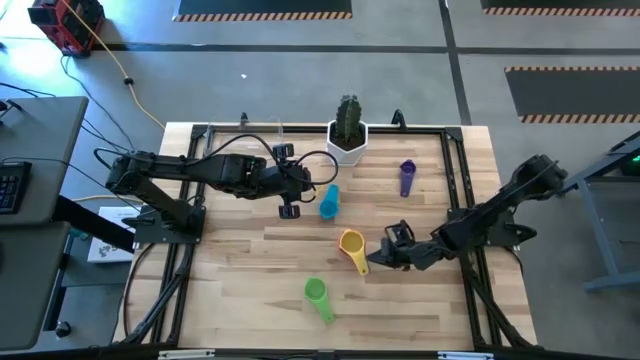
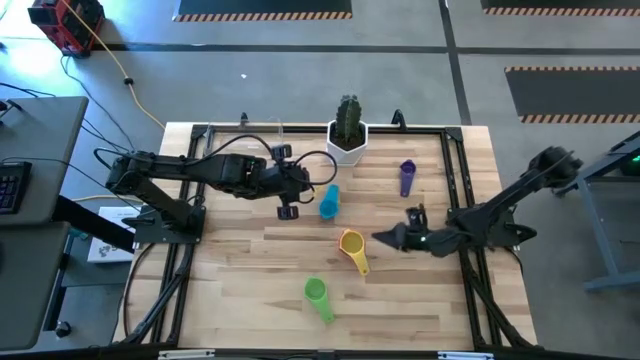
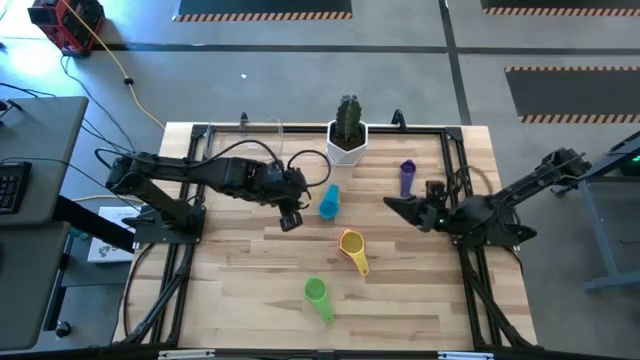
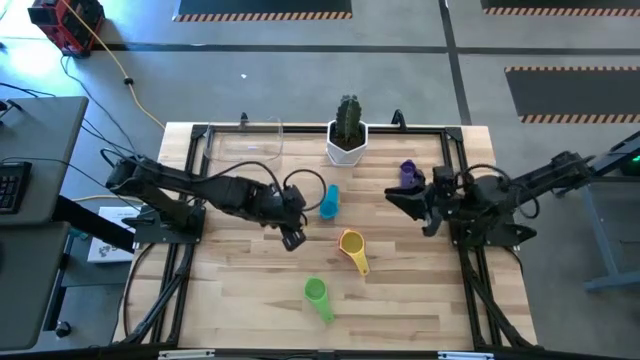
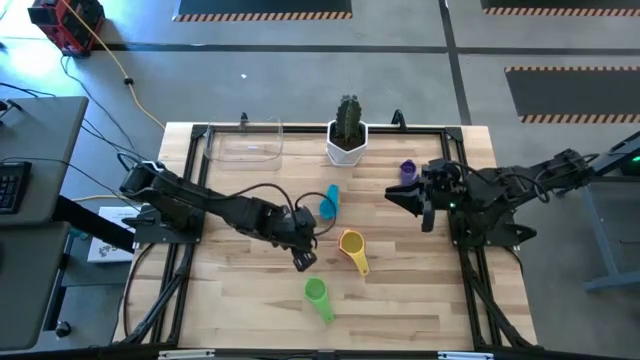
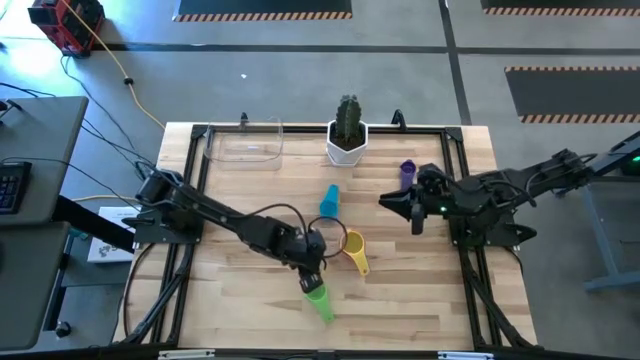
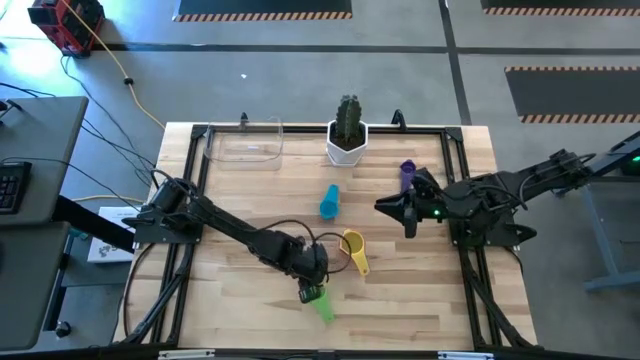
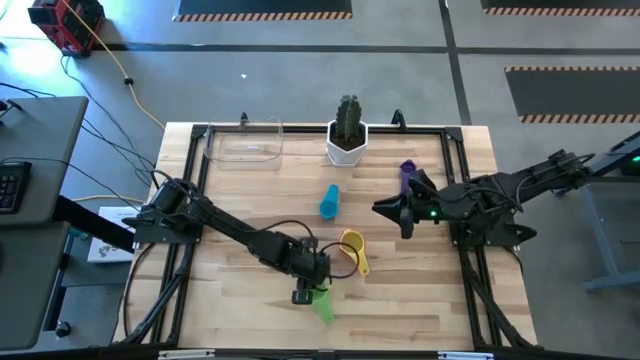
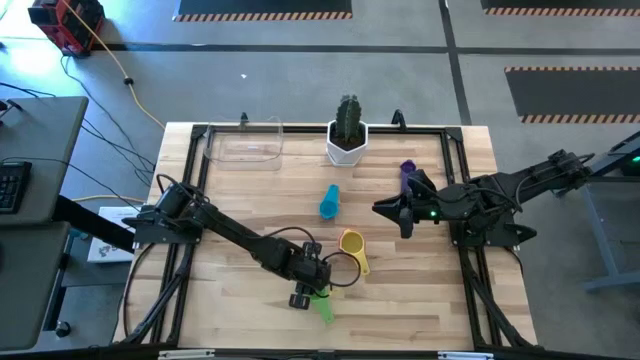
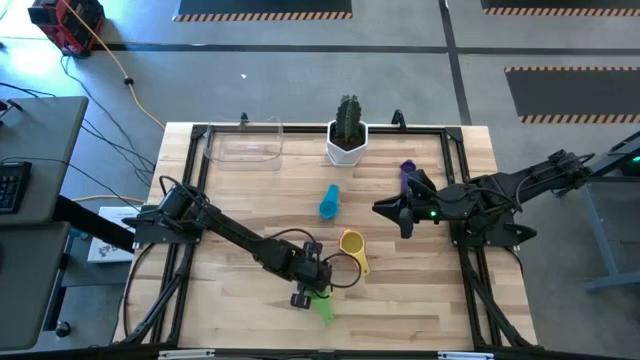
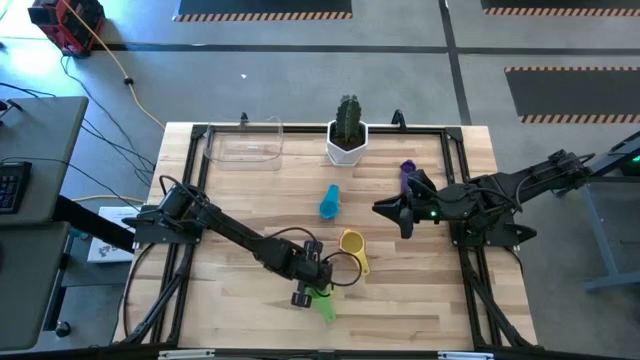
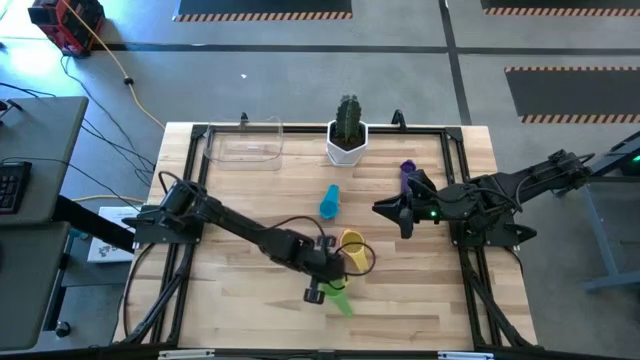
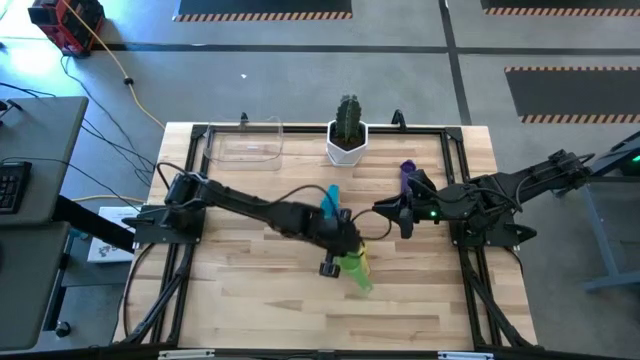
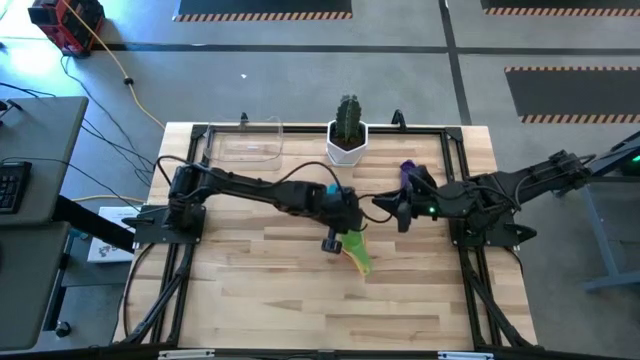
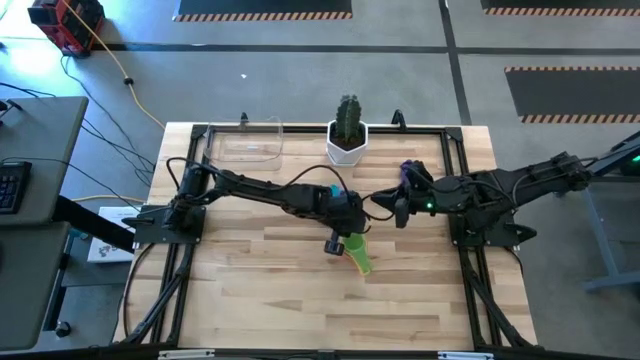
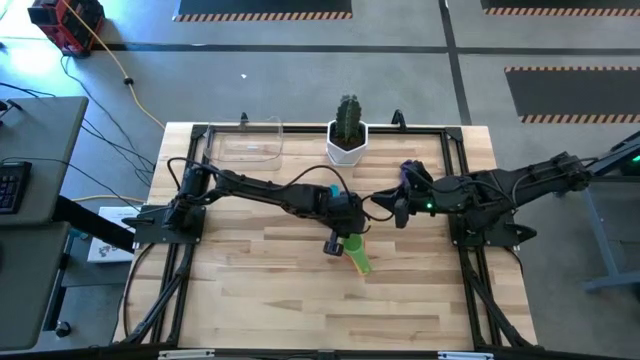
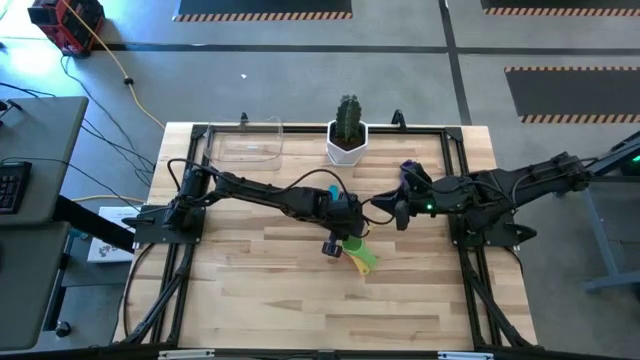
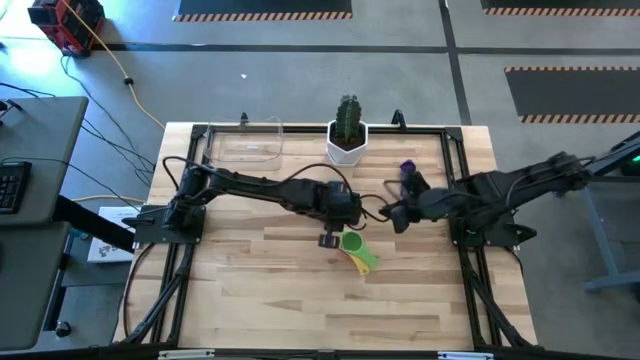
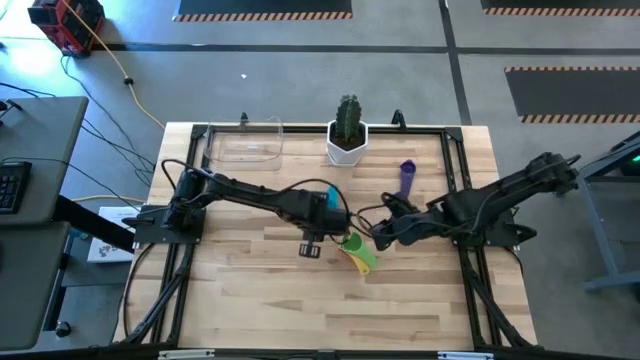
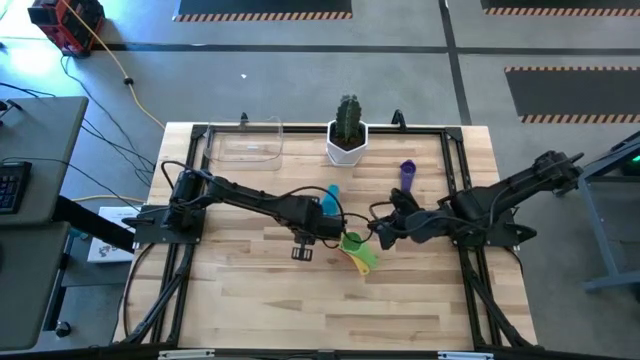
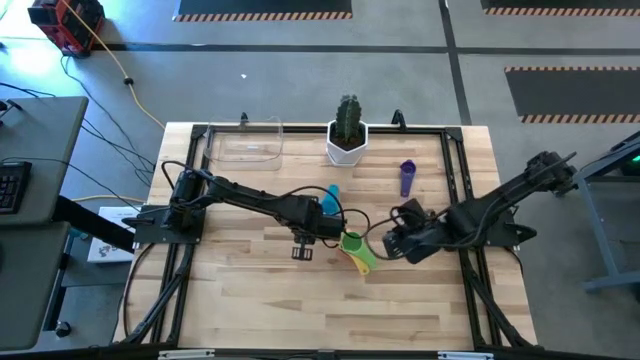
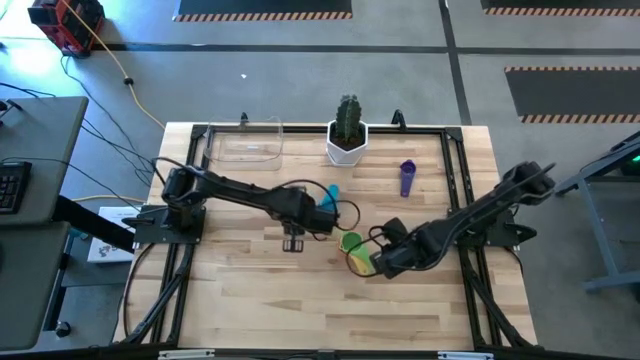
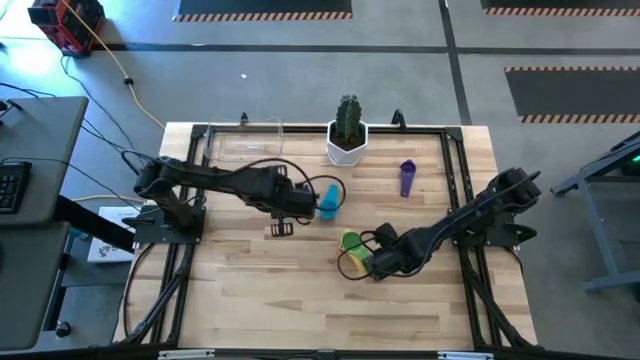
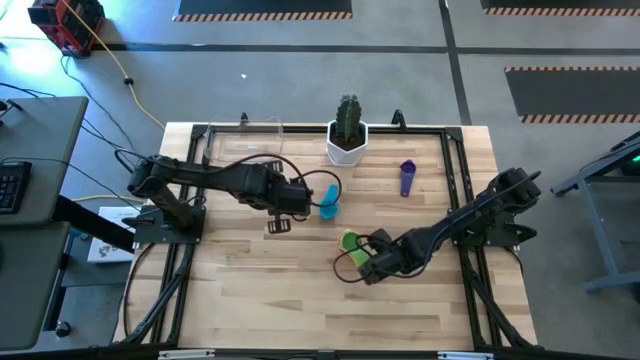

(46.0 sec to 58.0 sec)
Task: Nest measuring cups in basket
Stack the green measuring cup on the yellow measuring cup

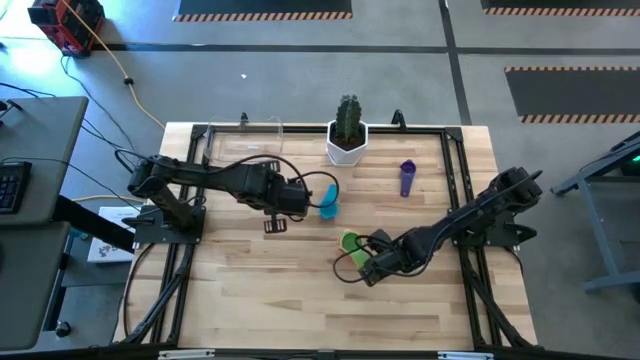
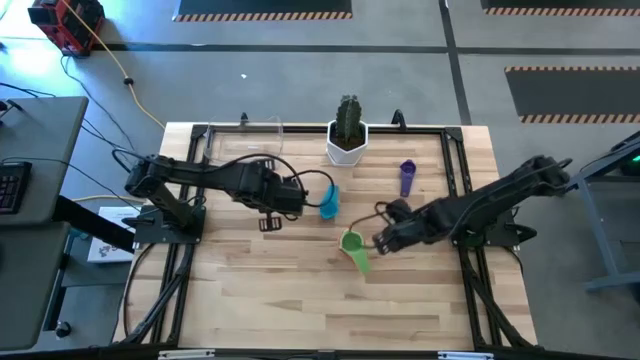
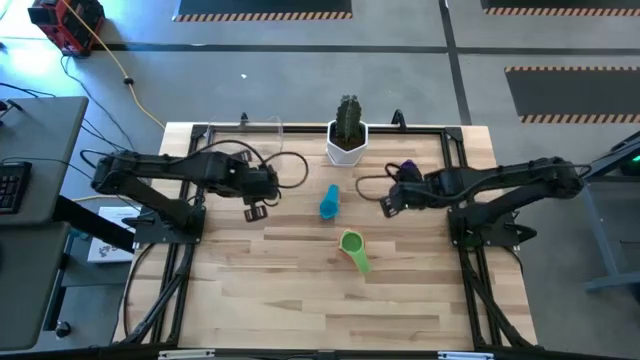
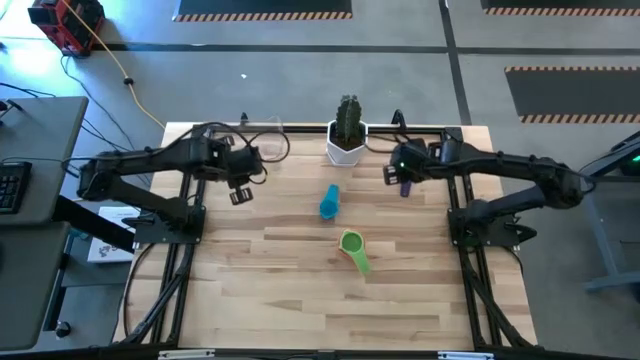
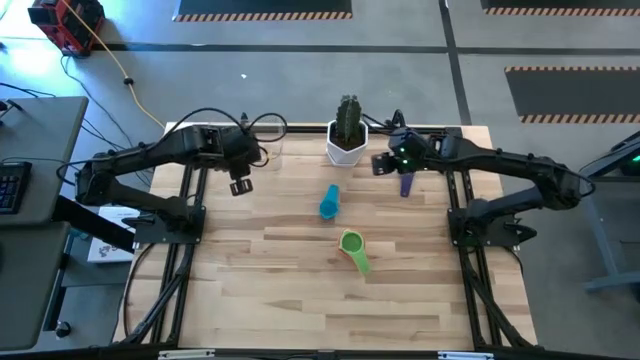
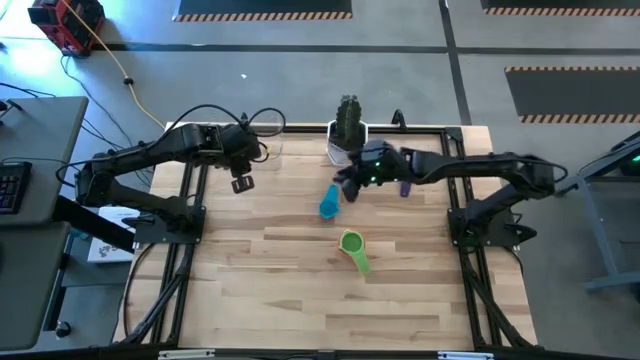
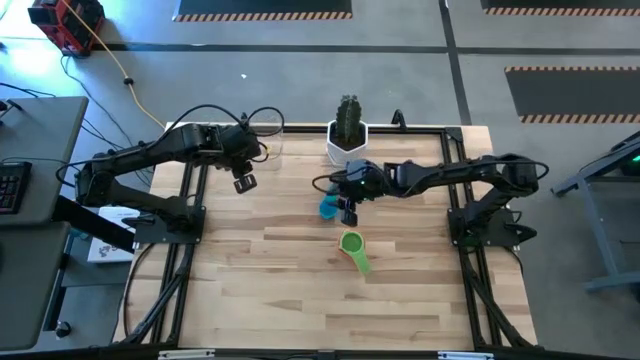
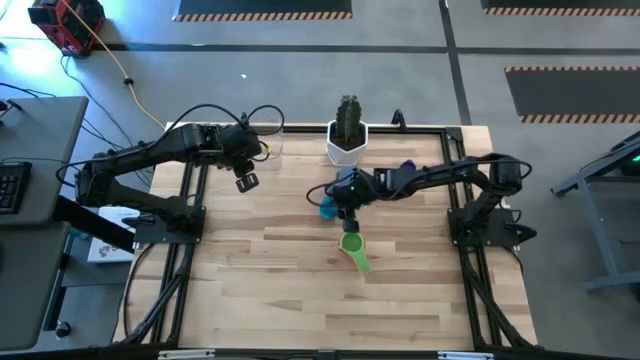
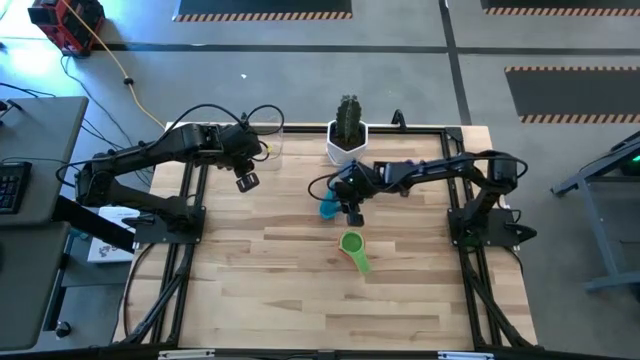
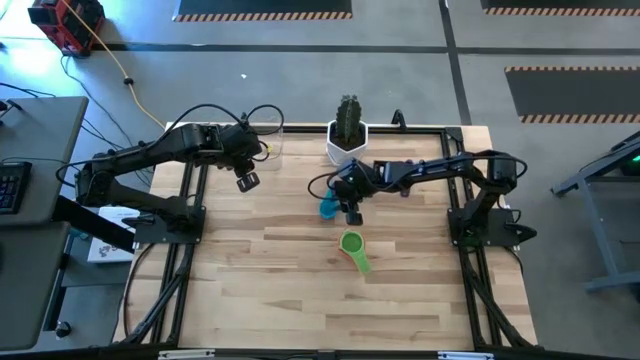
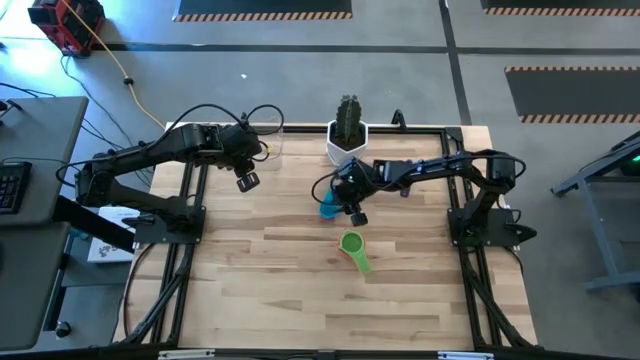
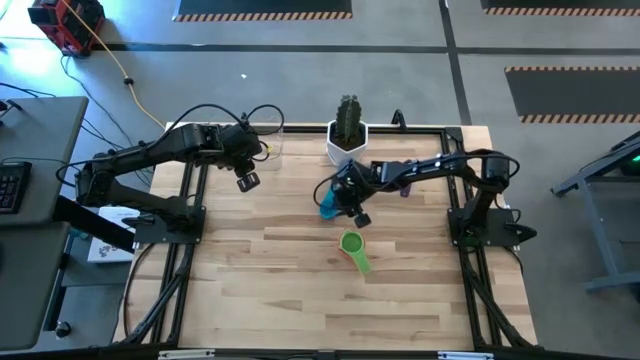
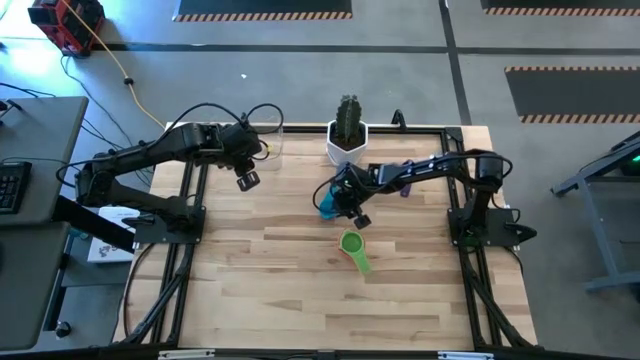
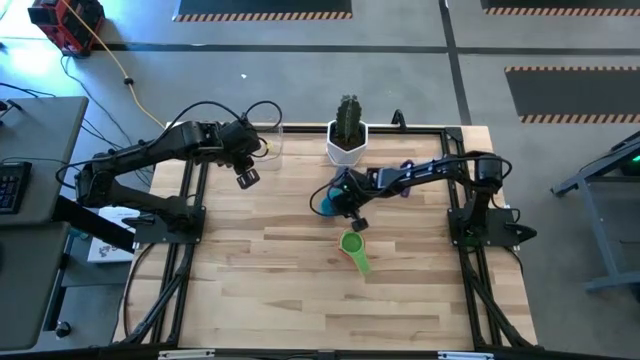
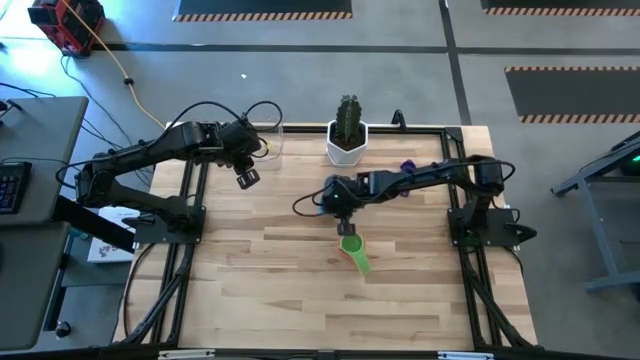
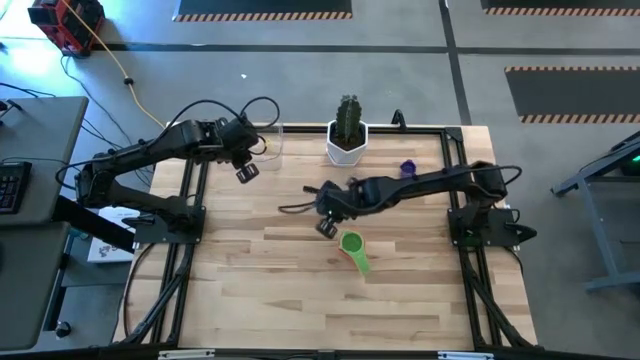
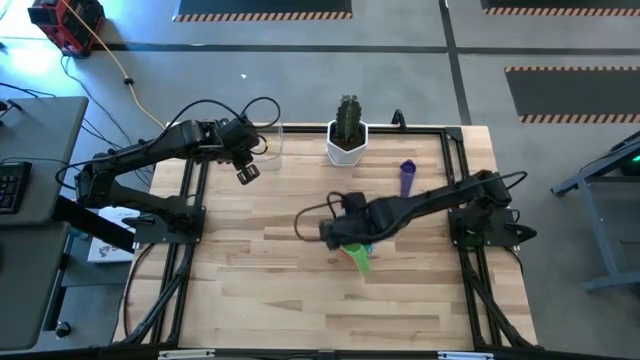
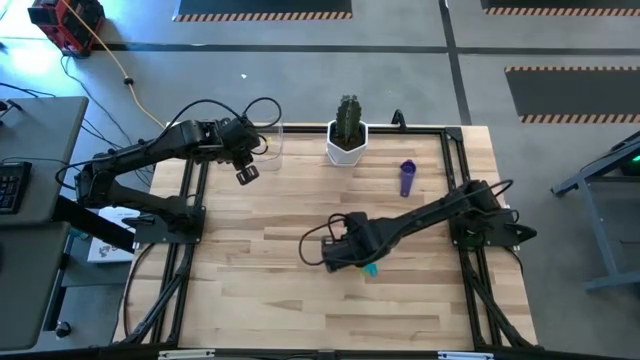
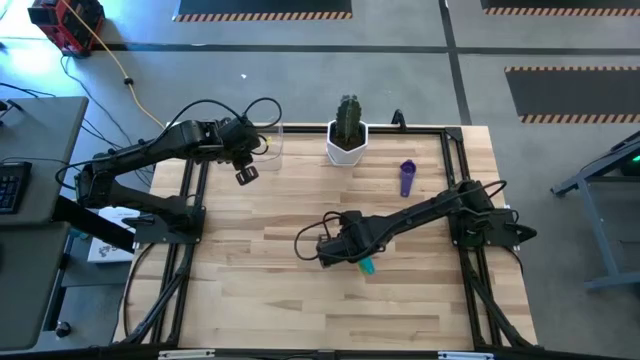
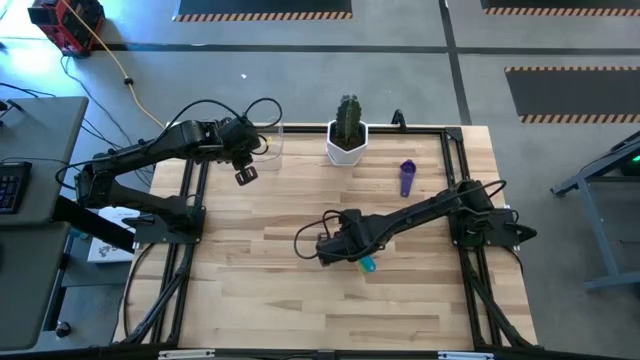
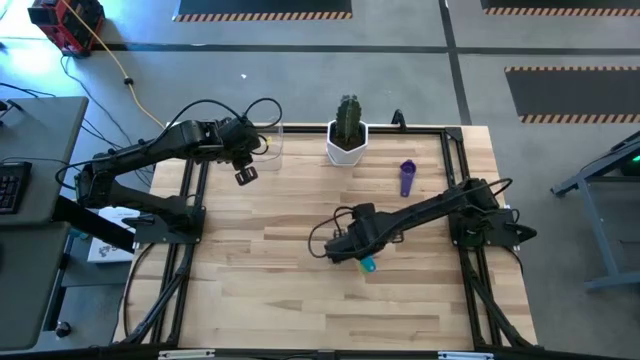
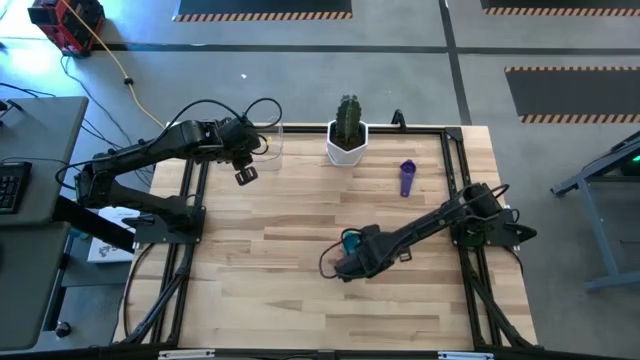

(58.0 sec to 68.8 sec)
Stack the light blue measuring cup on the green measuring cup
